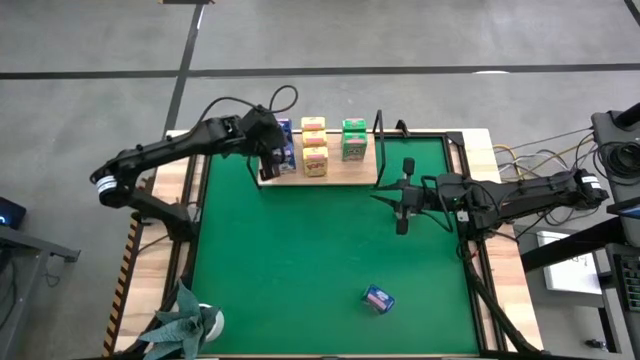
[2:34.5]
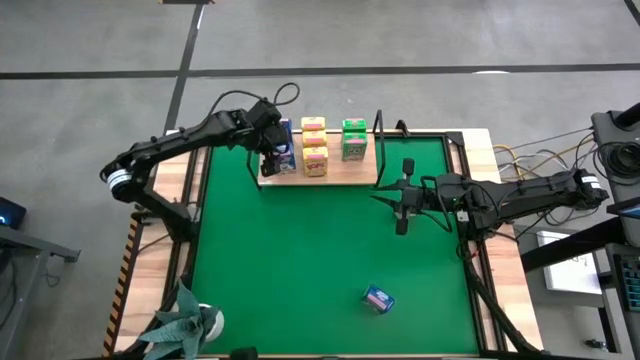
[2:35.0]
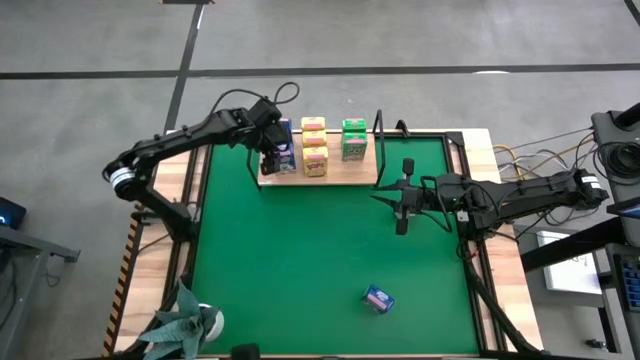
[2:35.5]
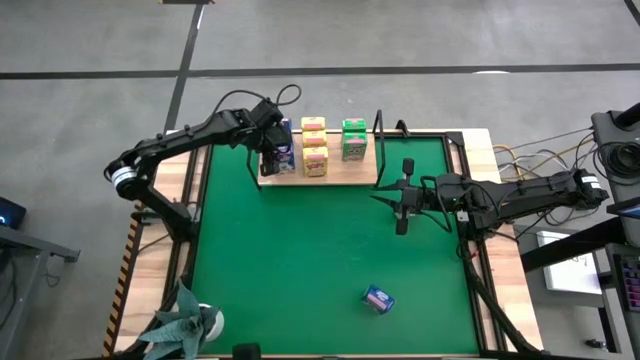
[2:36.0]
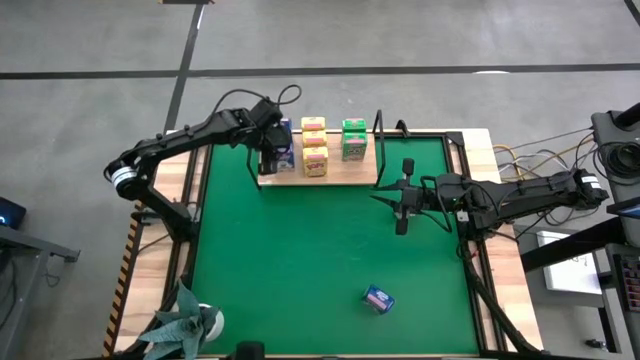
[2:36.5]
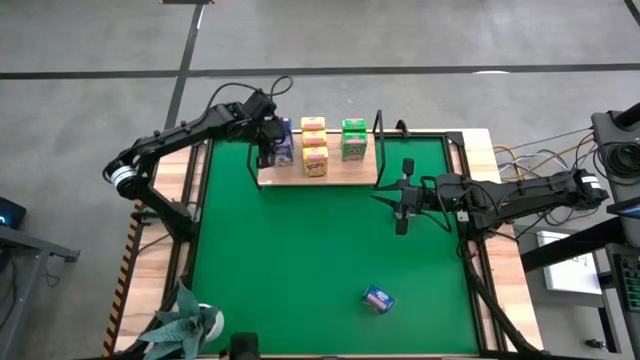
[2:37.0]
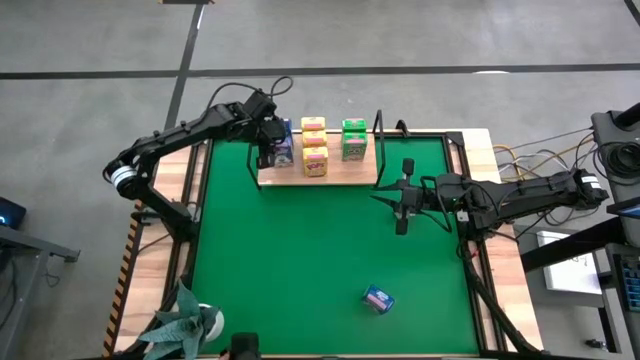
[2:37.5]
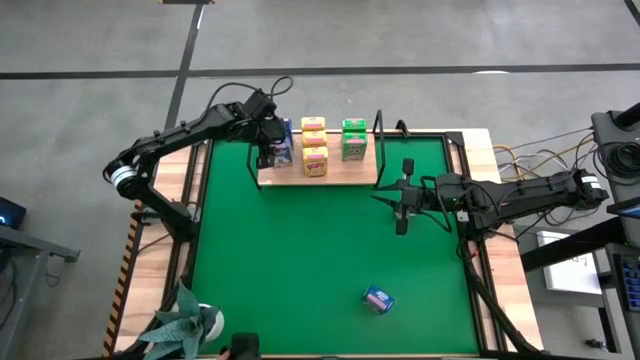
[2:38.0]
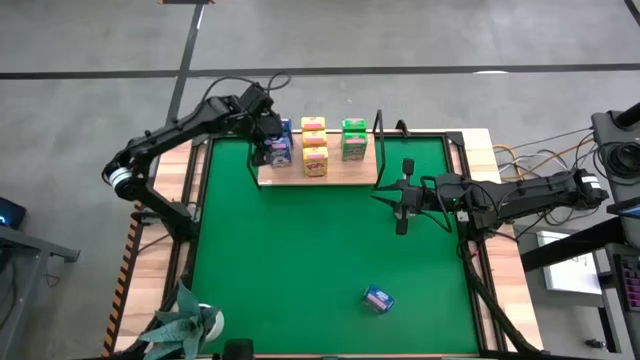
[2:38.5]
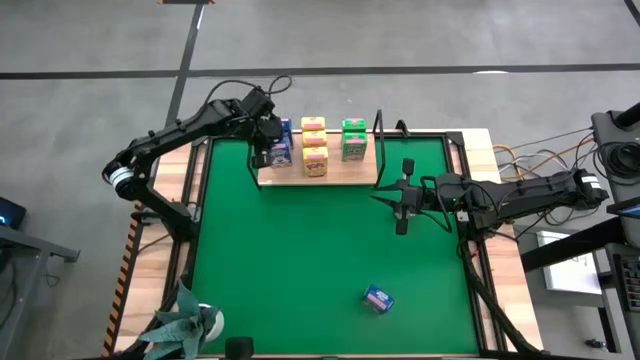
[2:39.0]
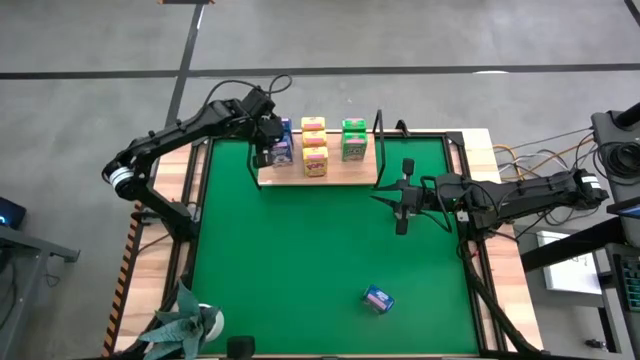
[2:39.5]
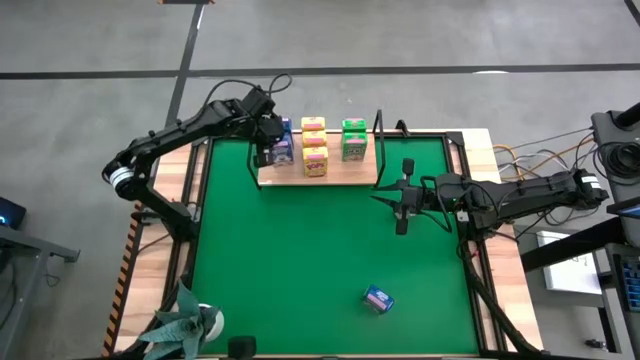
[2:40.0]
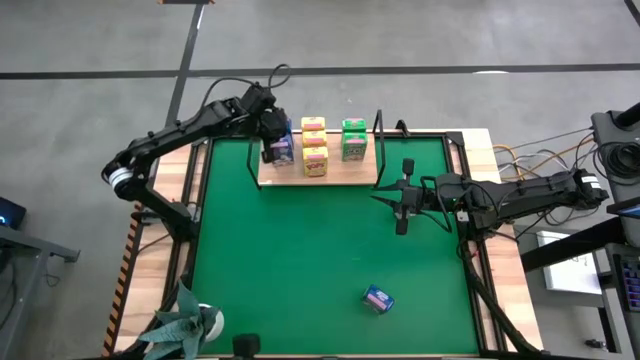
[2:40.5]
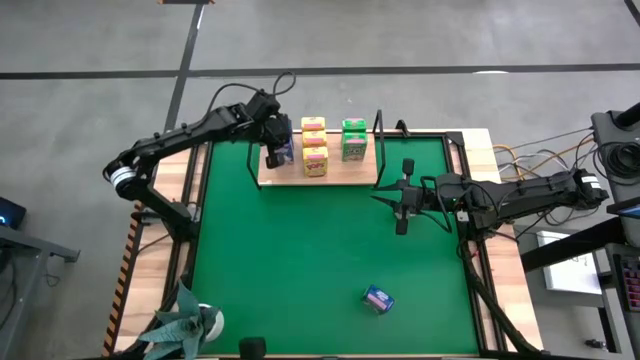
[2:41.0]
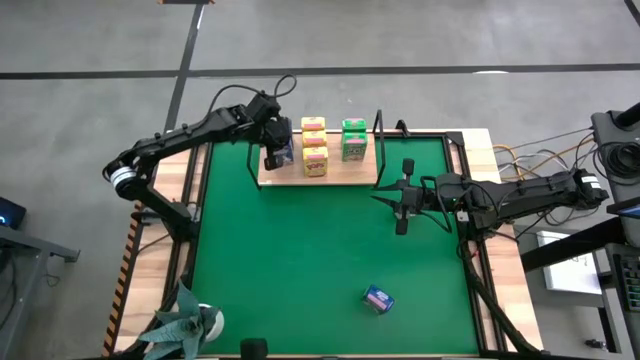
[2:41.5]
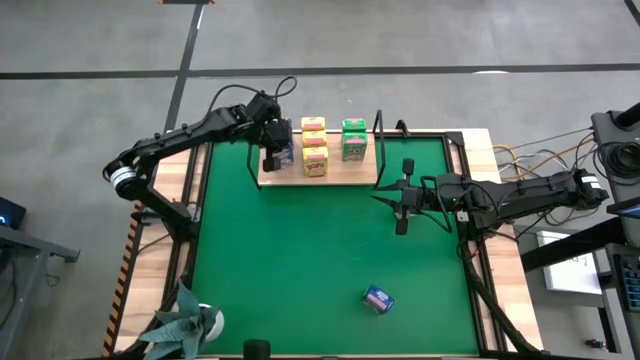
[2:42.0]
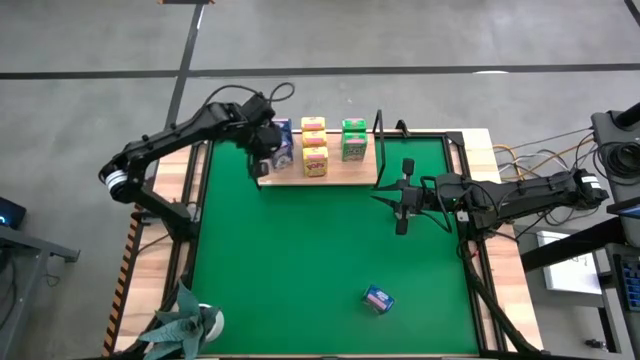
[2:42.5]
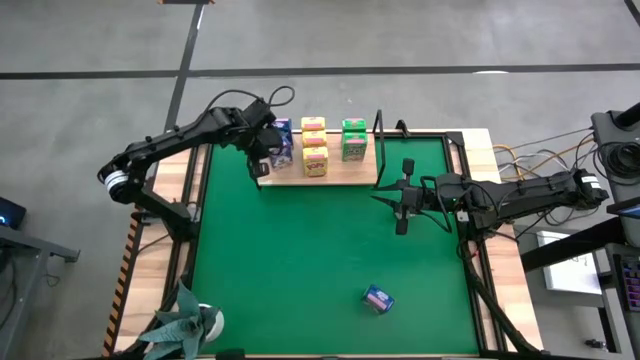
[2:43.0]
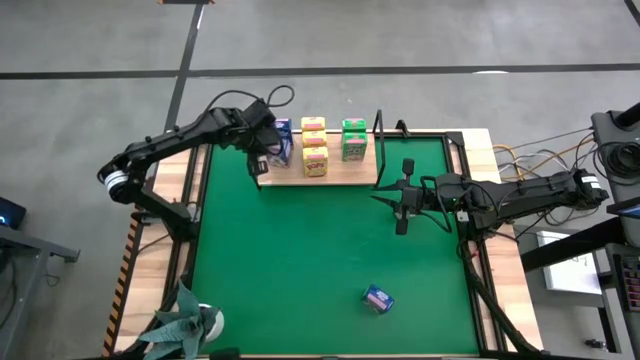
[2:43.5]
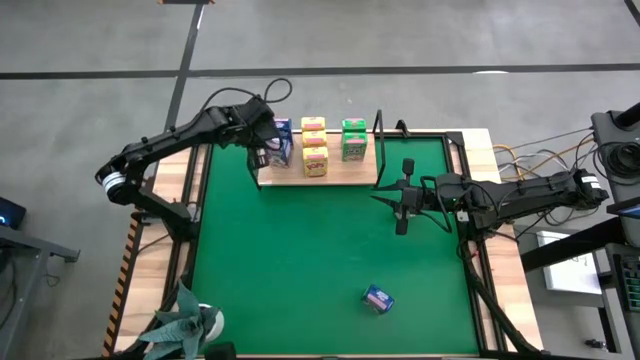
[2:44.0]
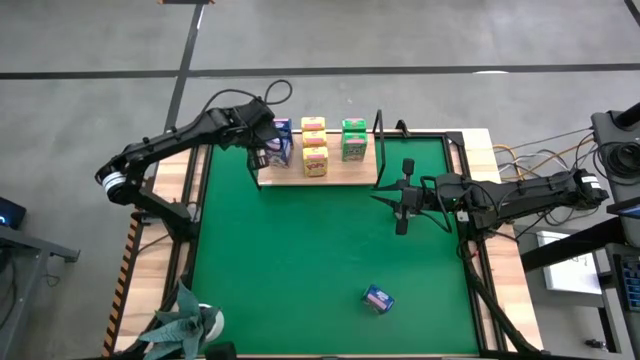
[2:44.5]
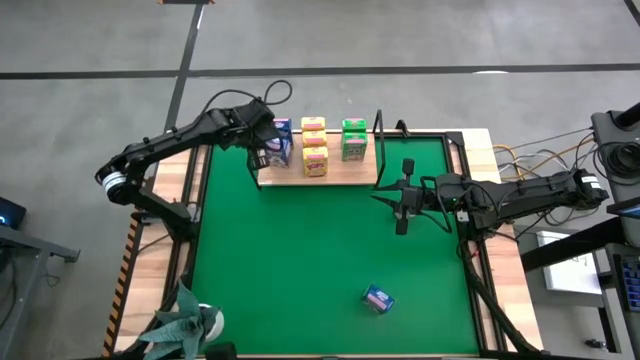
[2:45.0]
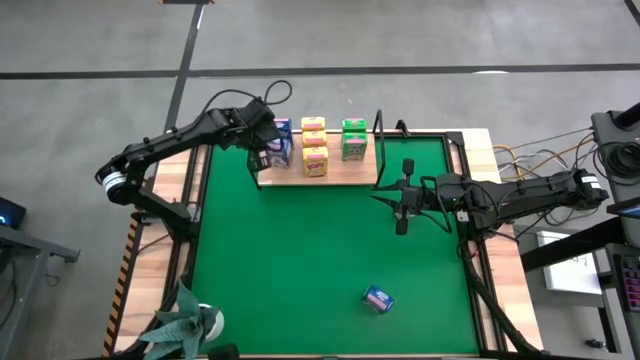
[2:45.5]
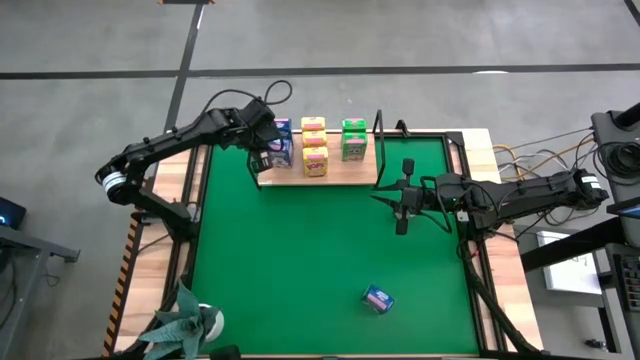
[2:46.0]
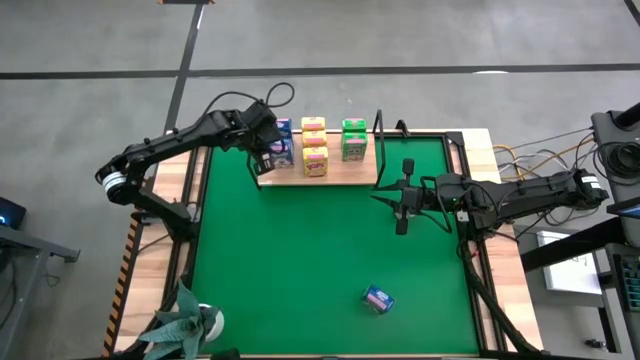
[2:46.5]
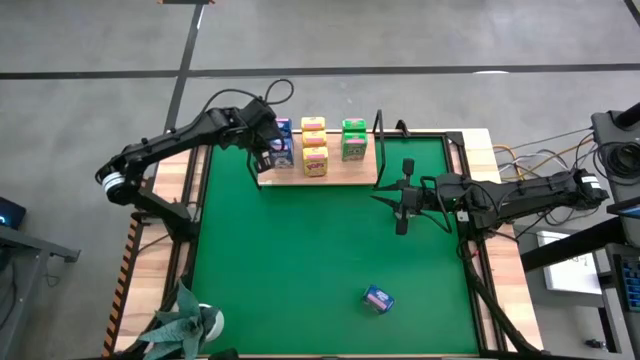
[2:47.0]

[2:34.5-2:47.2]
Task: Stack cereal on shelf
Put the top blue cereal box on the shelf aligned with the other blue cereal box

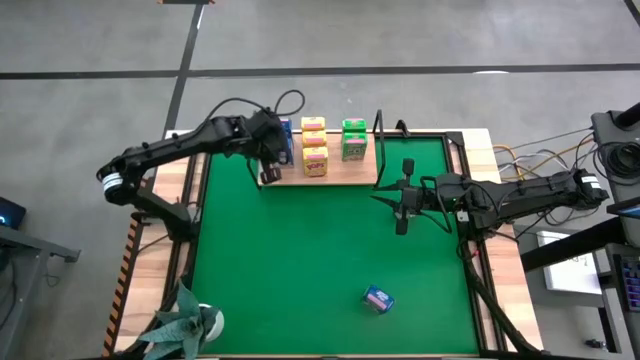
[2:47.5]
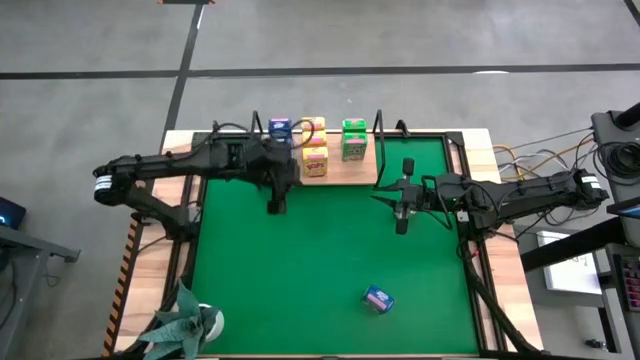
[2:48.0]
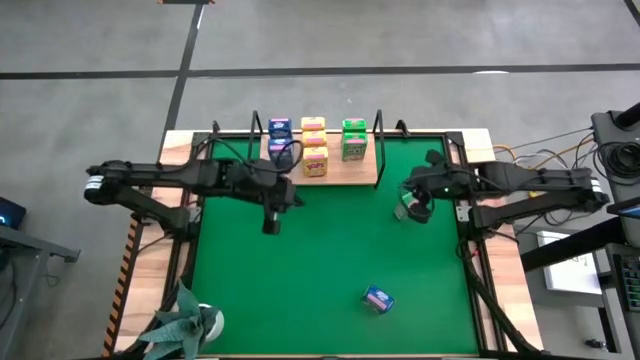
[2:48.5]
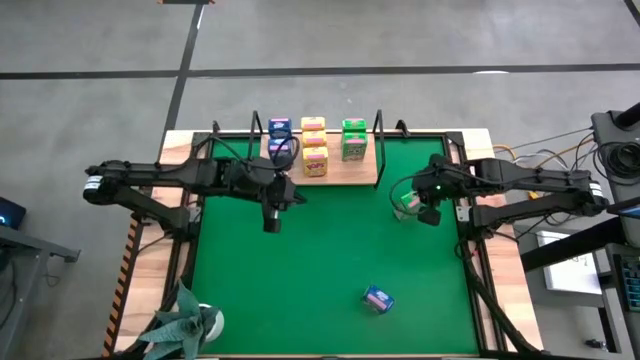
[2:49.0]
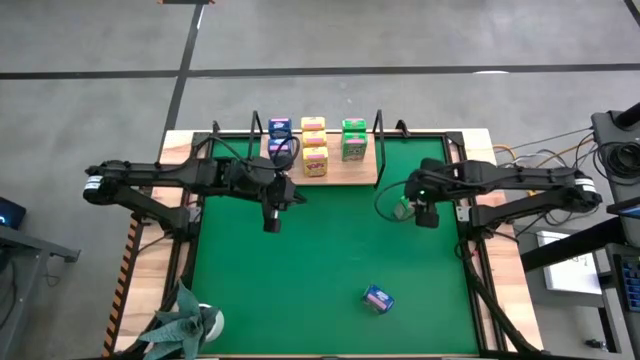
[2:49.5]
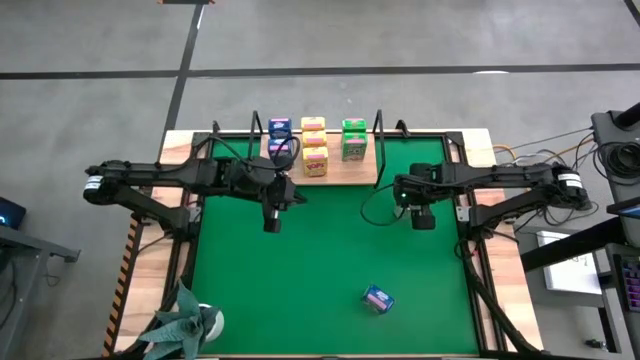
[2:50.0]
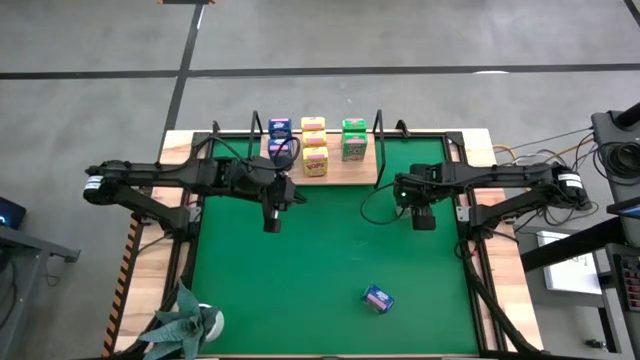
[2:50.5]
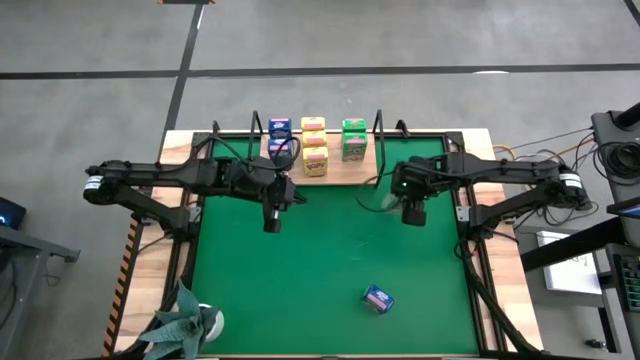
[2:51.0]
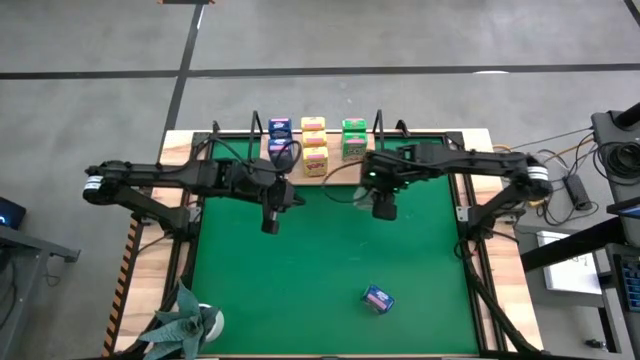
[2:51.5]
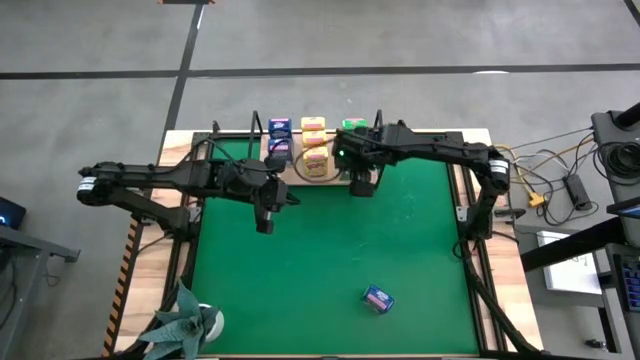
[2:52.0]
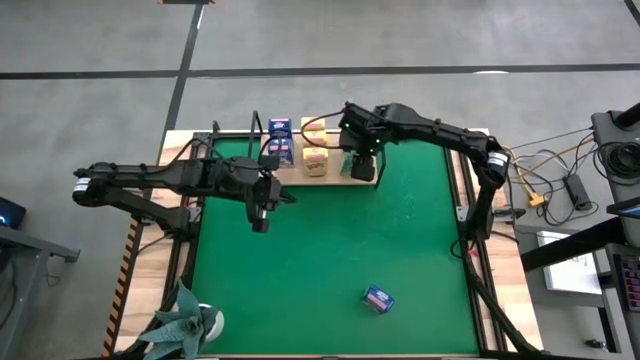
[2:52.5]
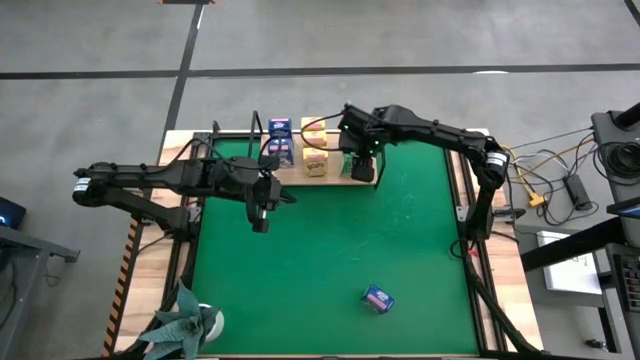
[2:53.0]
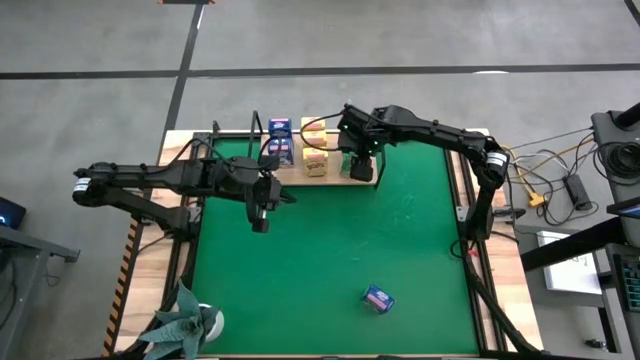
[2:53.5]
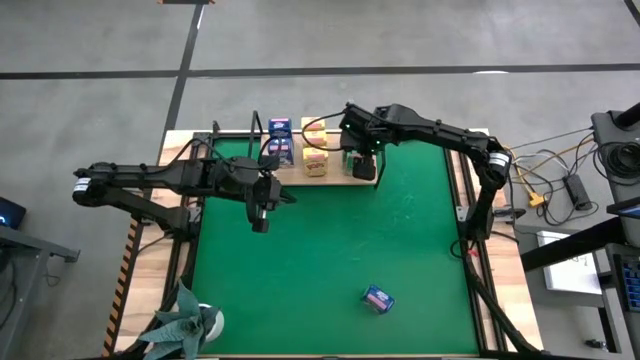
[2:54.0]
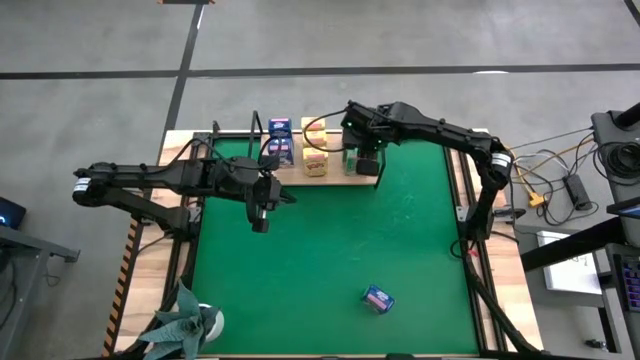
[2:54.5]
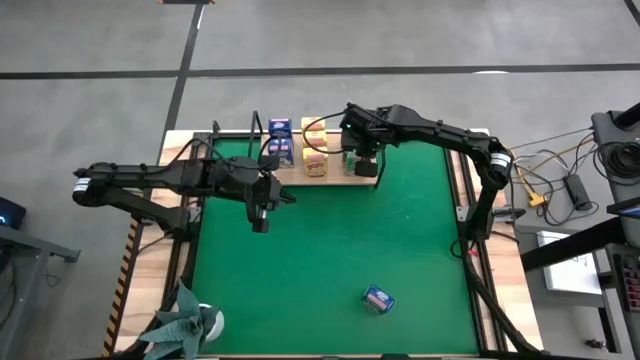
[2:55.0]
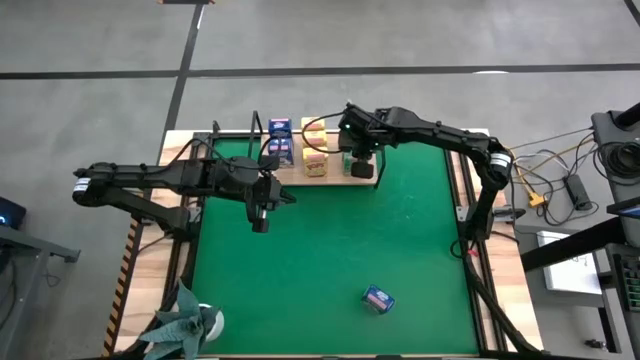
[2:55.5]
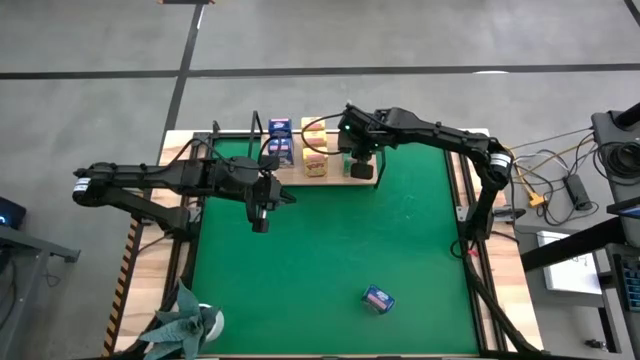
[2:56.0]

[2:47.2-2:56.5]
Put the green cereal box on the shelf aligned with the other green cereal boxes
